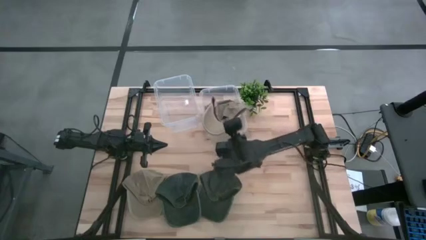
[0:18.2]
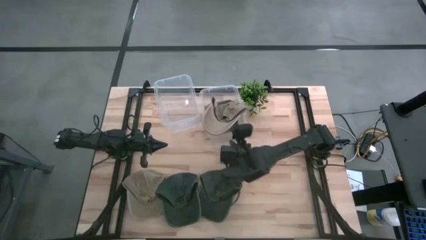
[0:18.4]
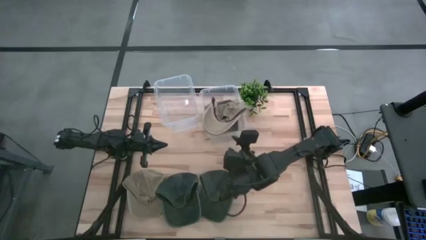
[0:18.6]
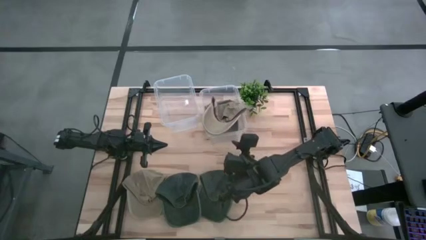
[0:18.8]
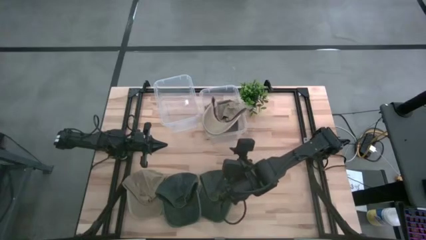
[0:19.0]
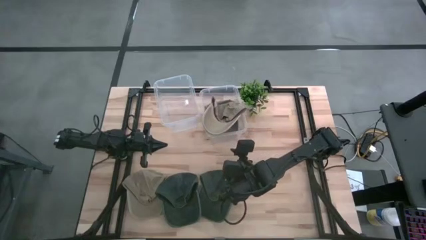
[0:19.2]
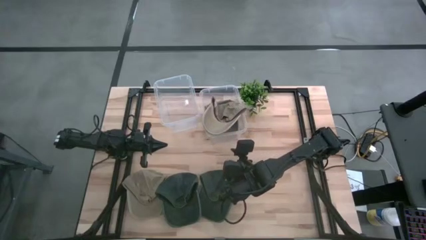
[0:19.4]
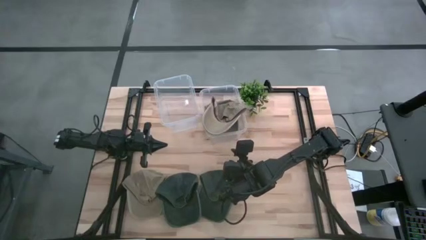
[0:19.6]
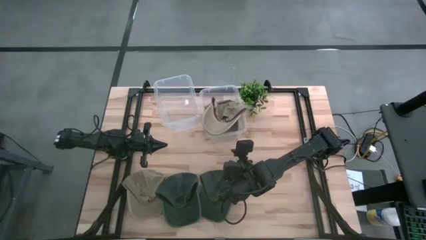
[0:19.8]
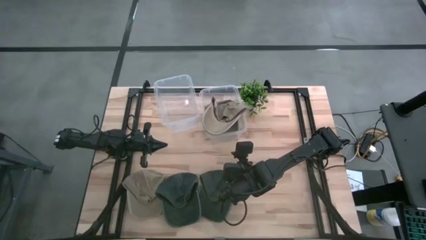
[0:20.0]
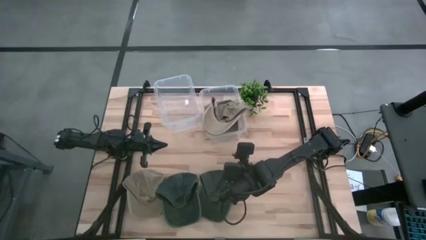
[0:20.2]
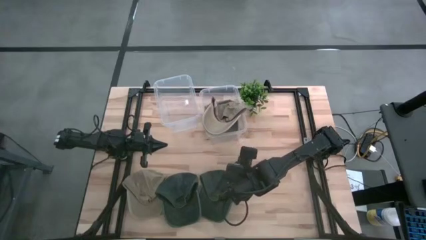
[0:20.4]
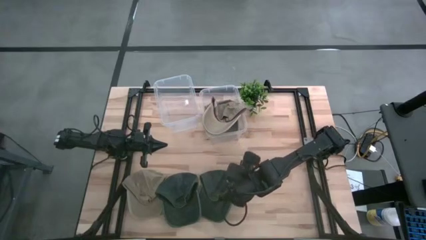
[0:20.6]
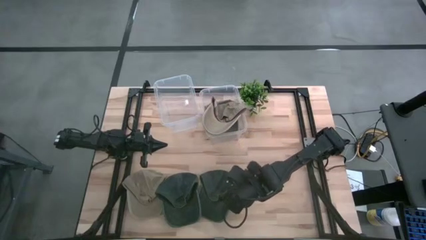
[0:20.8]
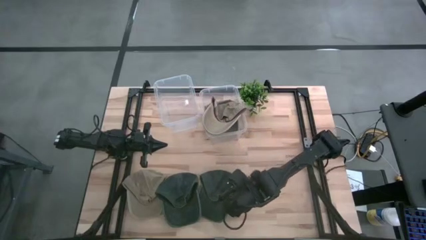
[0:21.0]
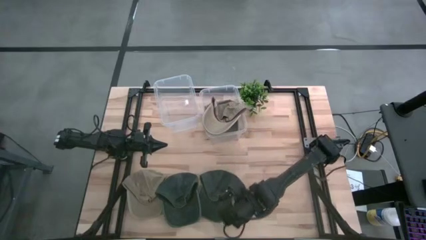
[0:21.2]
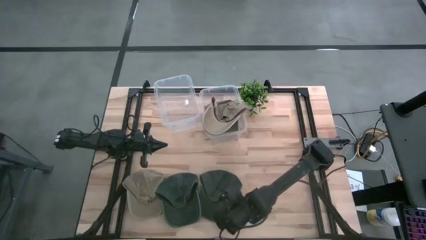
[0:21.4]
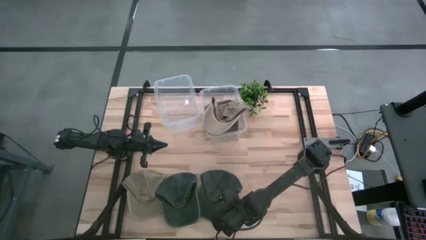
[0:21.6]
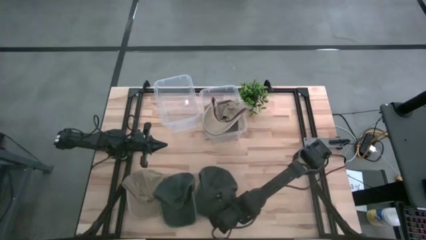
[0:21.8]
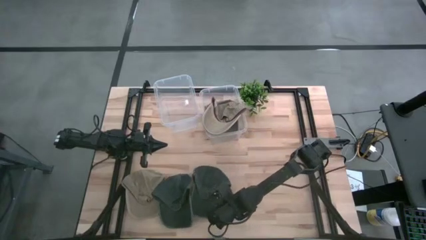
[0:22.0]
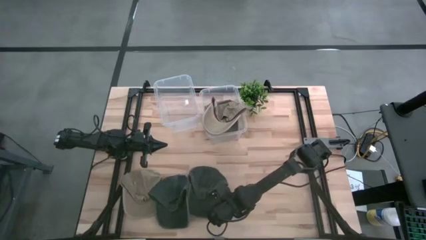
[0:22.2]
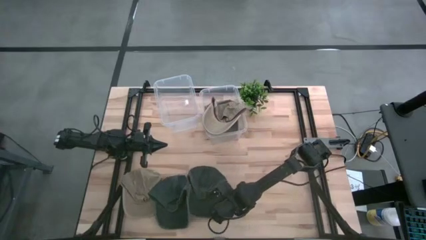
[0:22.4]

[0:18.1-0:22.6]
Task: Pick & Place hat
Put the right black cap into the left transparent bin

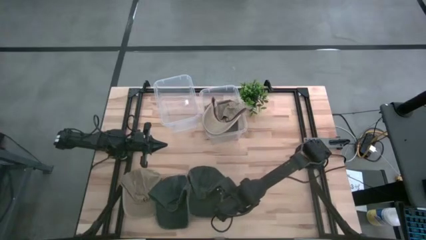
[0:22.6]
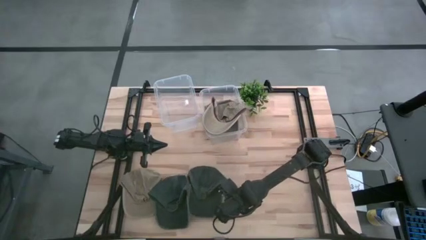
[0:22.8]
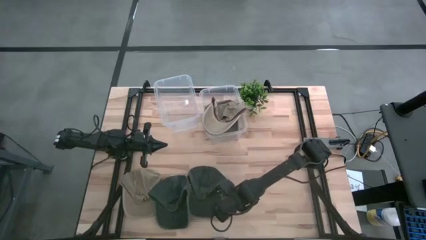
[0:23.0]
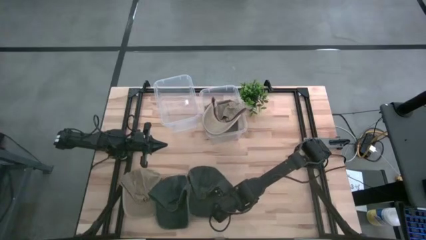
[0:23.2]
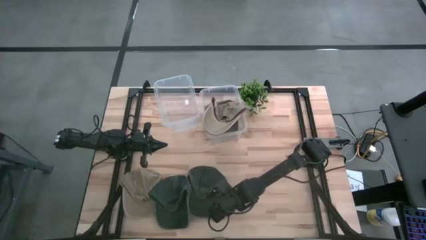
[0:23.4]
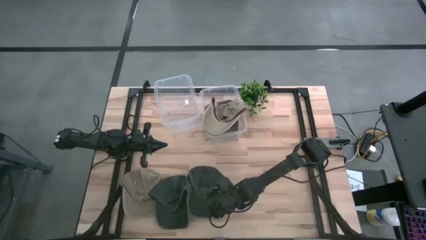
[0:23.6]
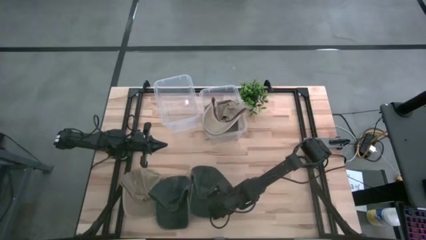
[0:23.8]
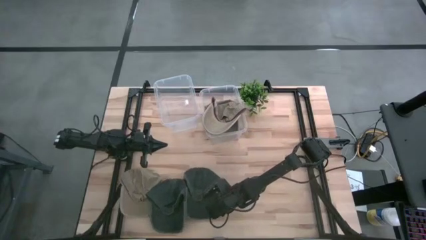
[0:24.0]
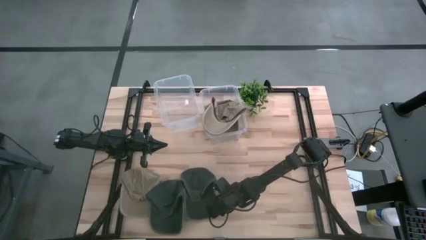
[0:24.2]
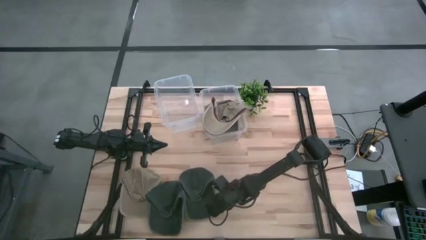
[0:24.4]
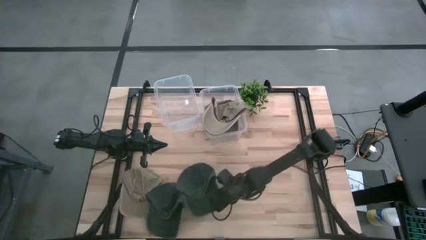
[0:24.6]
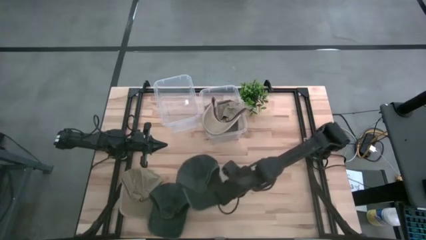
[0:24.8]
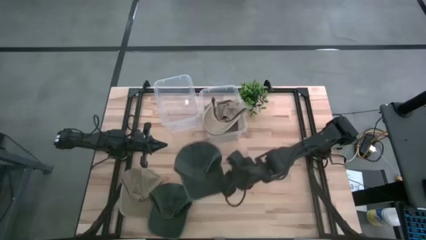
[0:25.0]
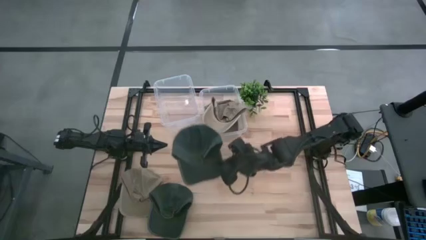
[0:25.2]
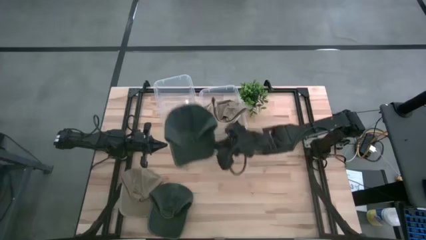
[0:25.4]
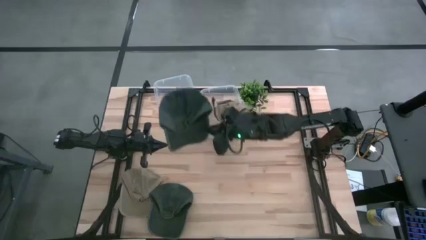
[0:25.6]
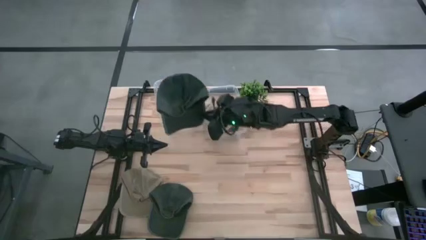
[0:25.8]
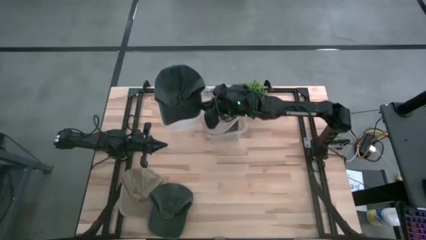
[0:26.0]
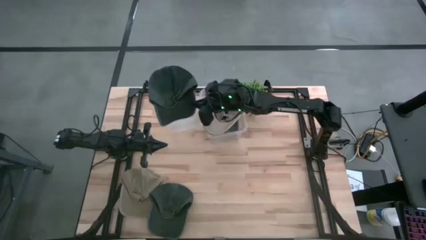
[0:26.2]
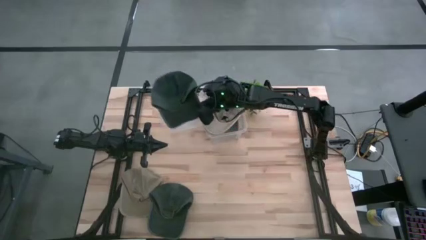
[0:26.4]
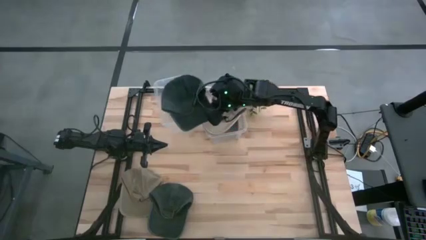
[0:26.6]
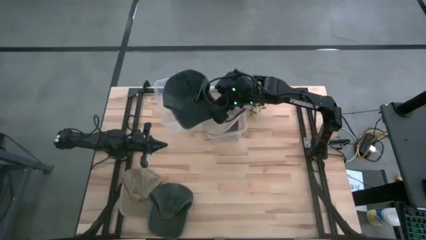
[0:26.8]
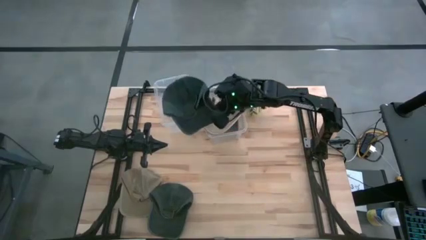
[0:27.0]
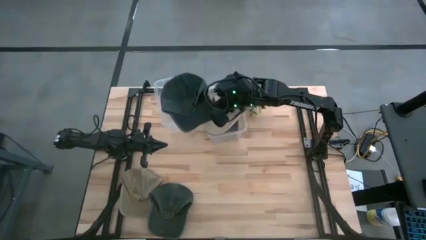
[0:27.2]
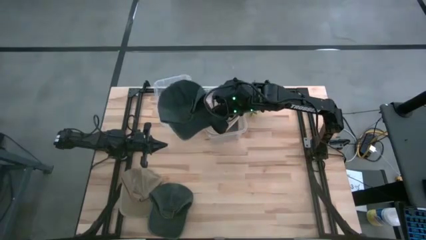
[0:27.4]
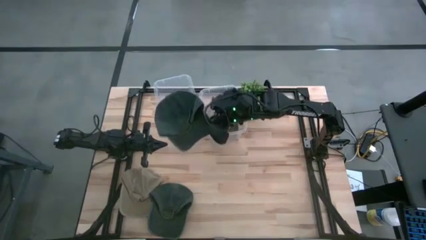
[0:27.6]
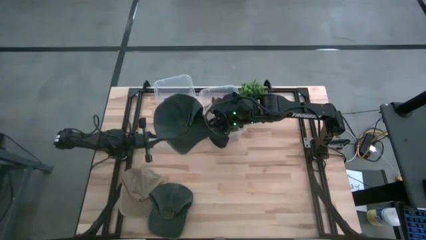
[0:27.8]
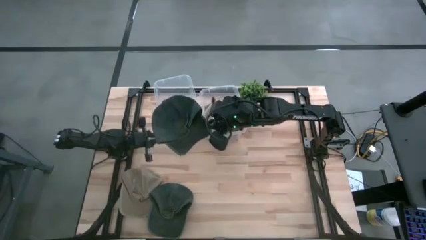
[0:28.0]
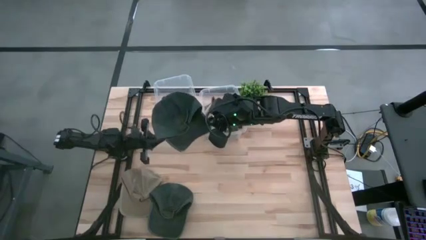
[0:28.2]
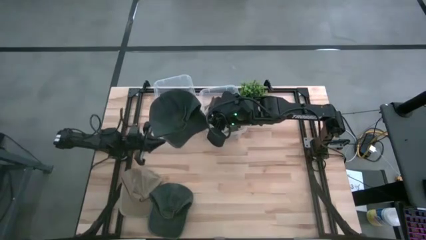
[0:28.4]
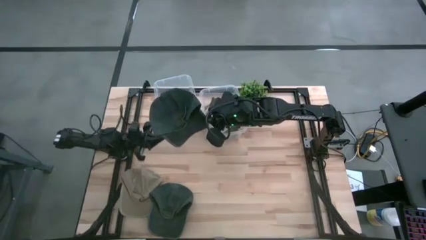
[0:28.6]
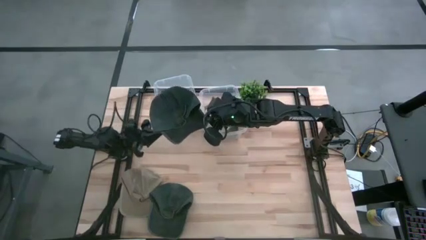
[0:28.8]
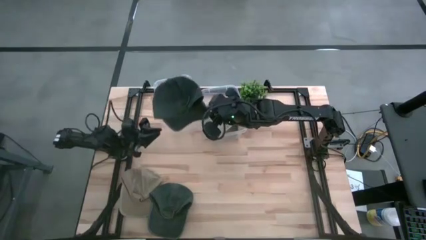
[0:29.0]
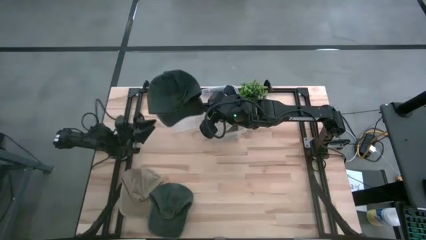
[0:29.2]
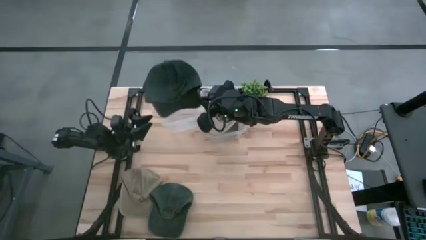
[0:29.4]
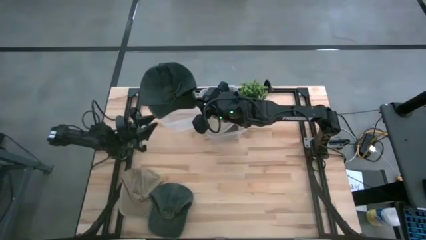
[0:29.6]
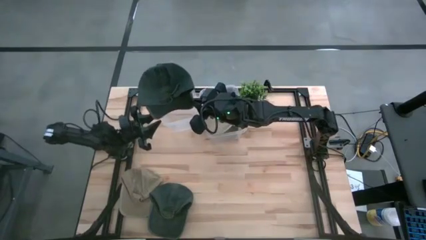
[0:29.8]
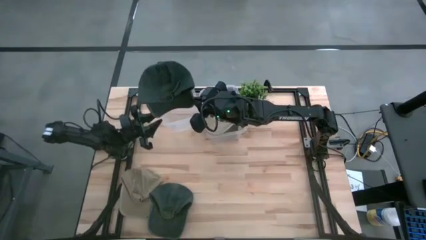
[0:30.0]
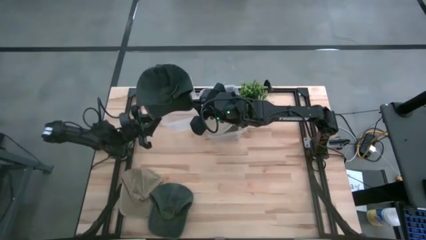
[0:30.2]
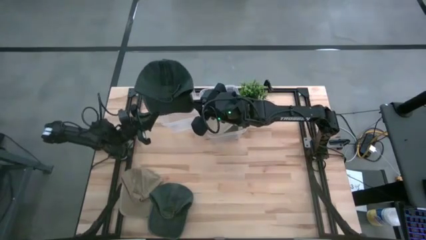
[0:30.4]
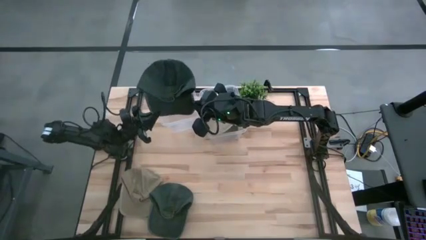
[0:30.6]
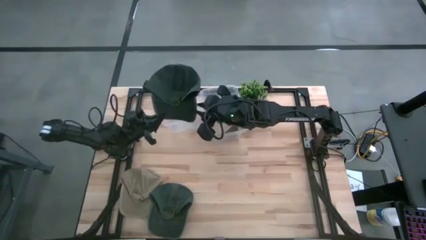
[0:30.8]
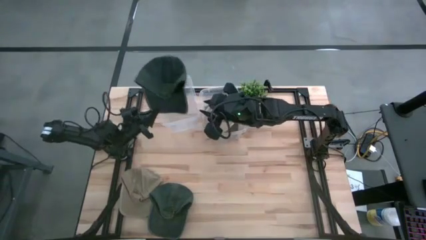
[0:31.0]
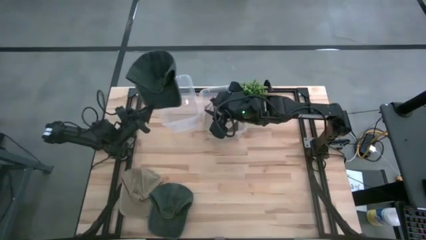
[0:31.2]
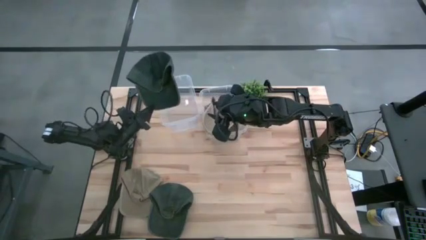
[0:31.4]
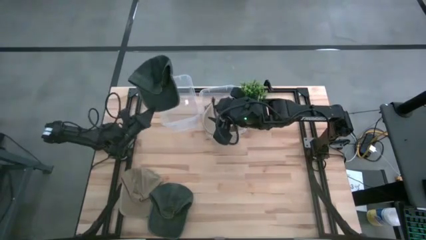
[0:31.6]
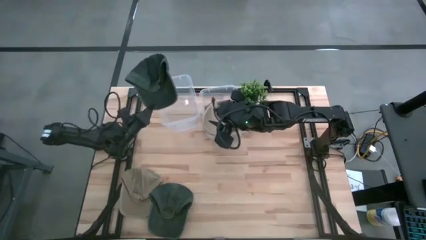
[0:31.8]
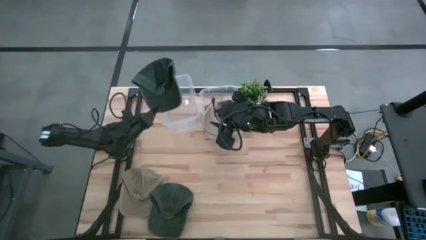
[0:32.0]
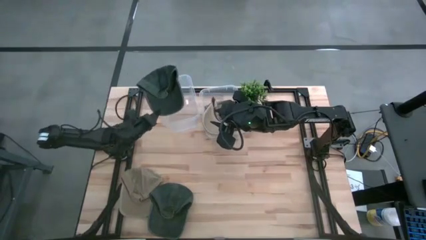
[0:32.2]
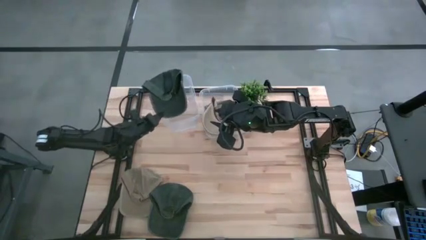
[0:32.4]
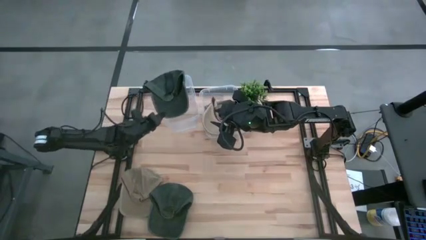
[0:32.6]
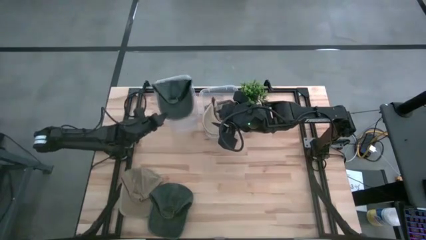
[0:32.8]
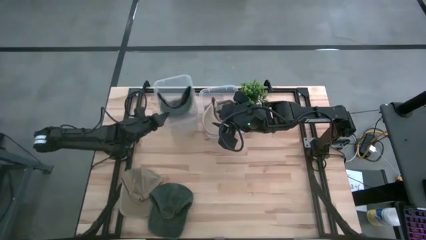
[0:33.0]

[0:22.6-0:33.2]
Put the right black cap into the left transparent bin
